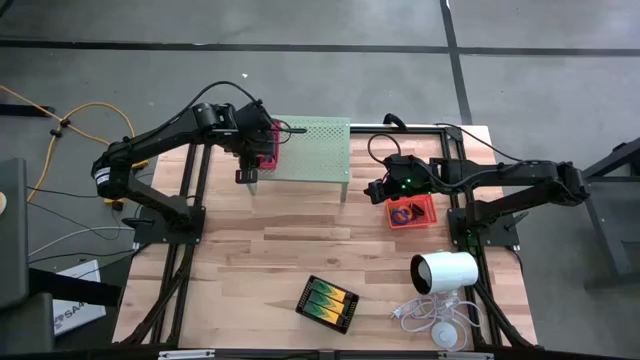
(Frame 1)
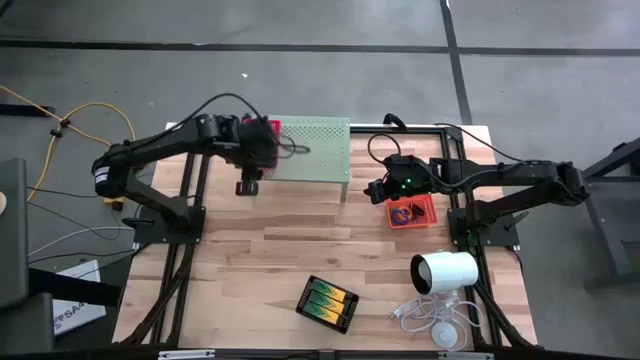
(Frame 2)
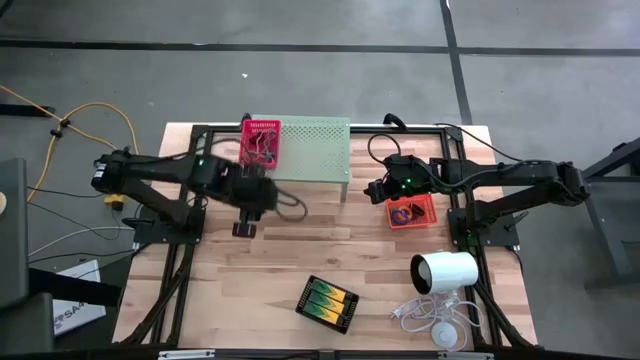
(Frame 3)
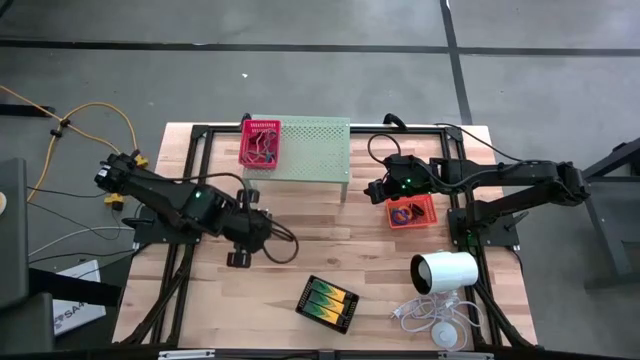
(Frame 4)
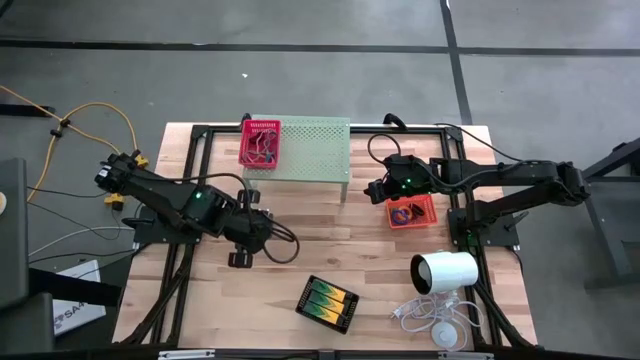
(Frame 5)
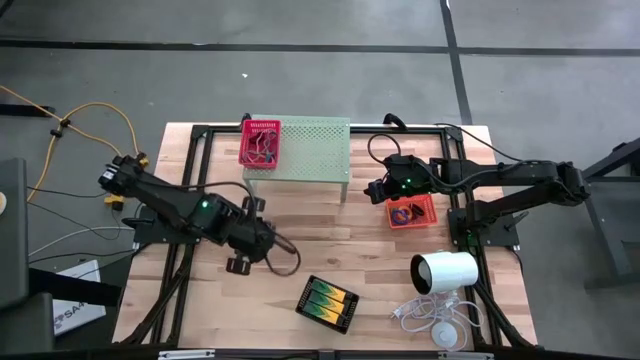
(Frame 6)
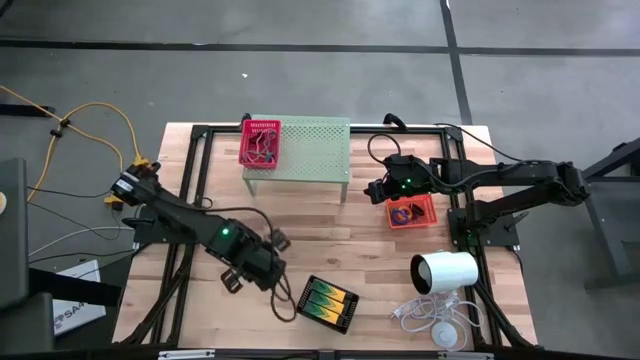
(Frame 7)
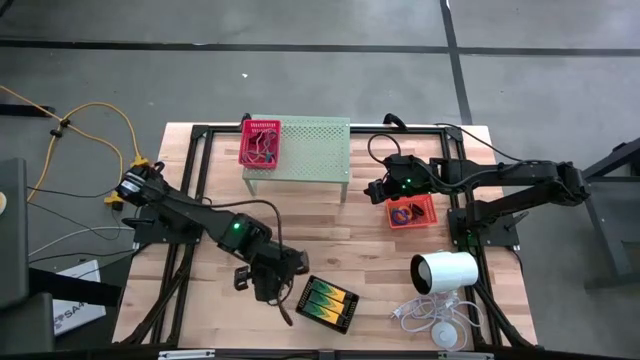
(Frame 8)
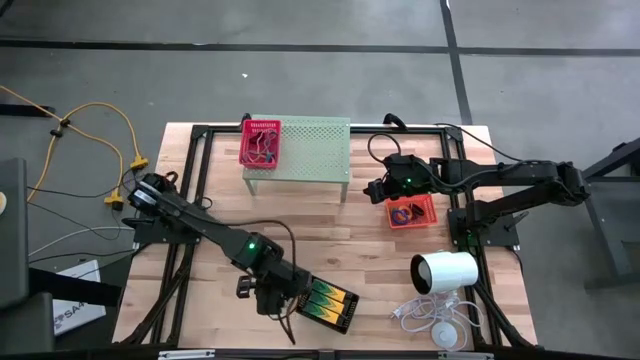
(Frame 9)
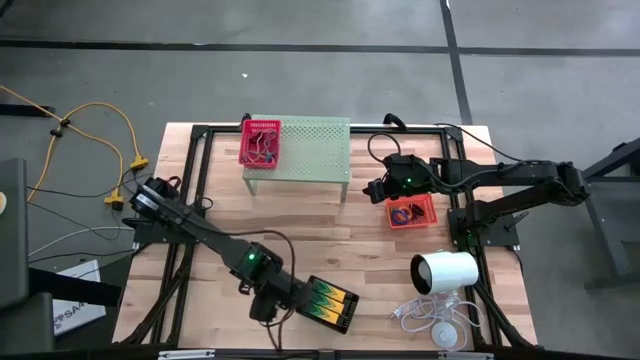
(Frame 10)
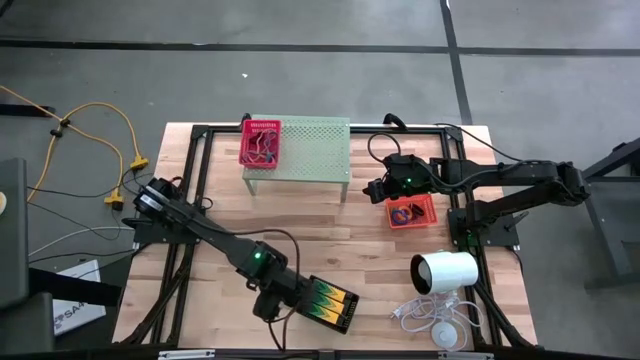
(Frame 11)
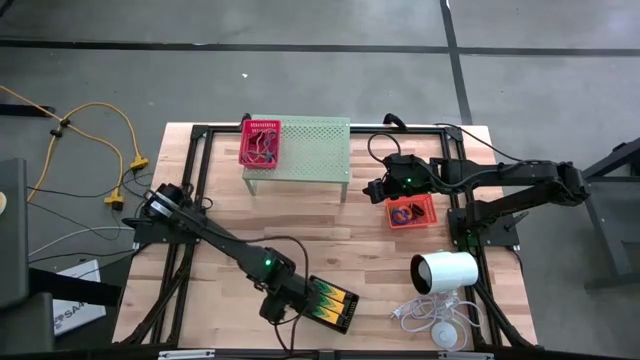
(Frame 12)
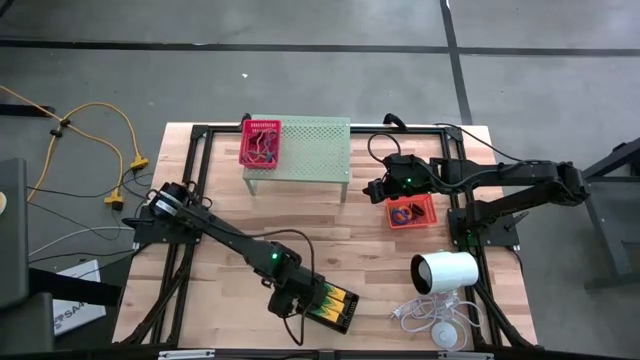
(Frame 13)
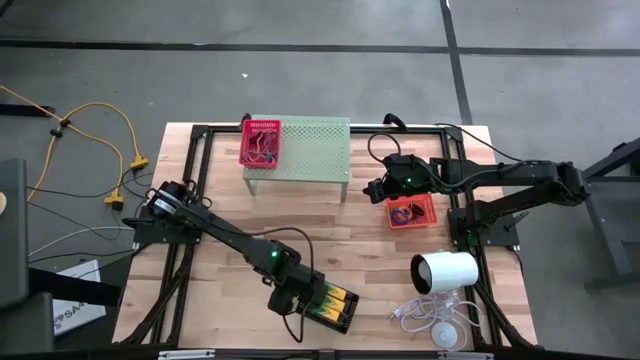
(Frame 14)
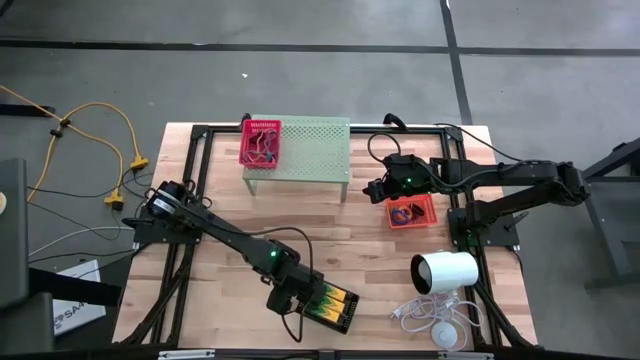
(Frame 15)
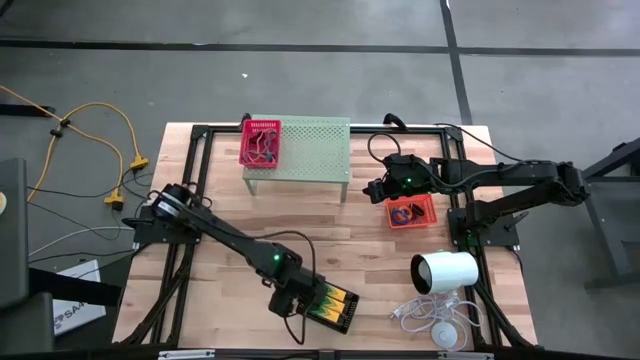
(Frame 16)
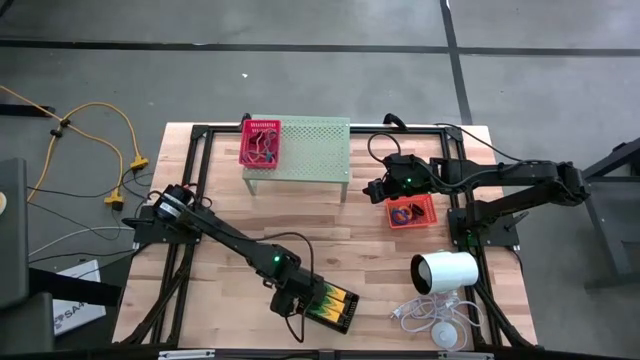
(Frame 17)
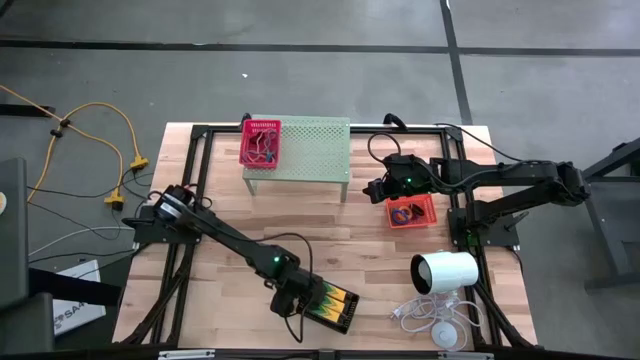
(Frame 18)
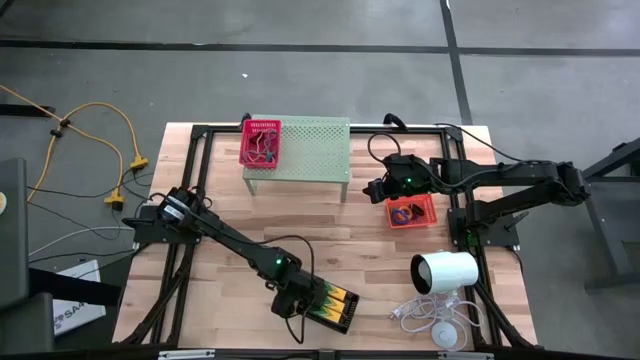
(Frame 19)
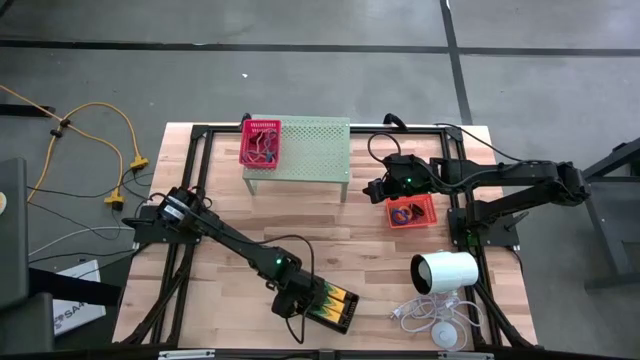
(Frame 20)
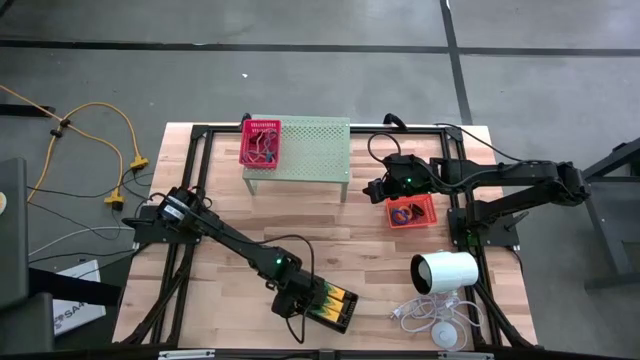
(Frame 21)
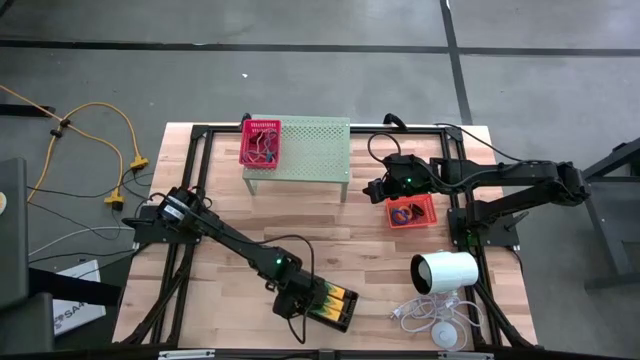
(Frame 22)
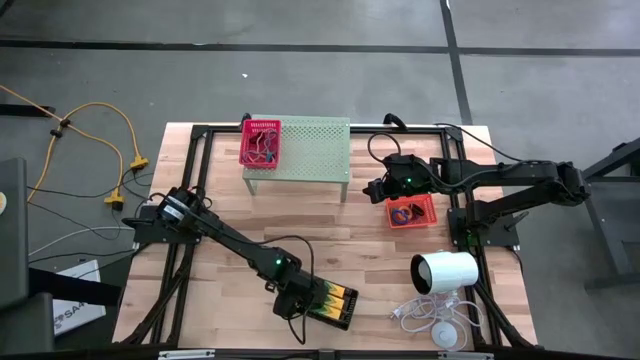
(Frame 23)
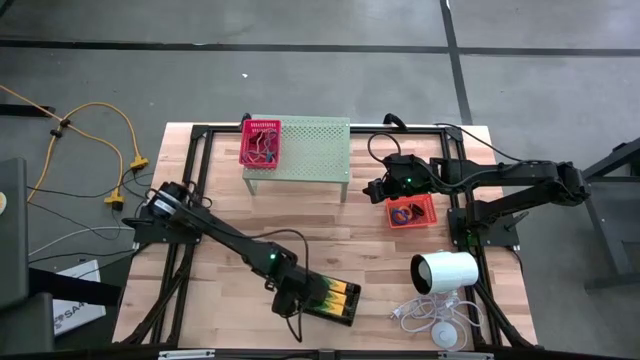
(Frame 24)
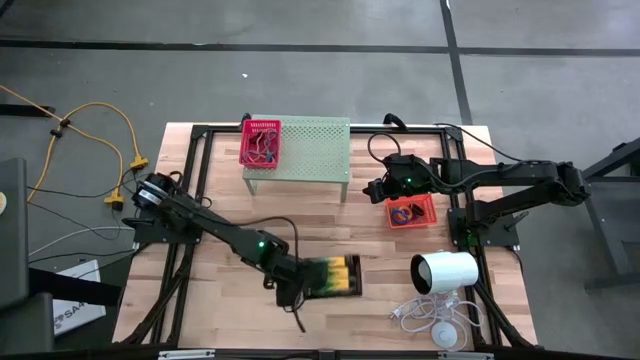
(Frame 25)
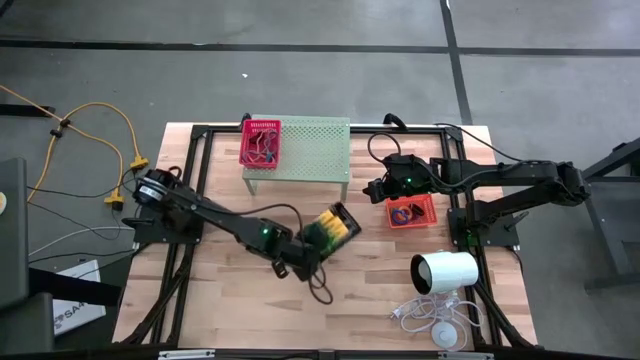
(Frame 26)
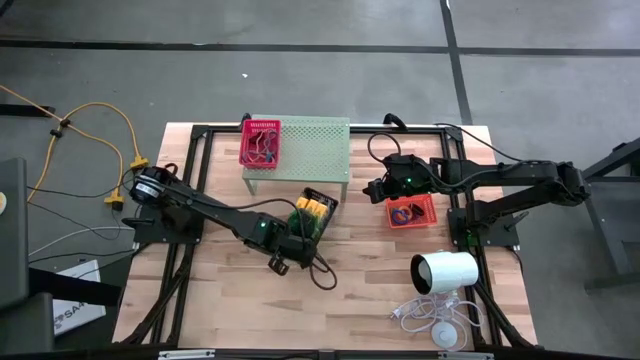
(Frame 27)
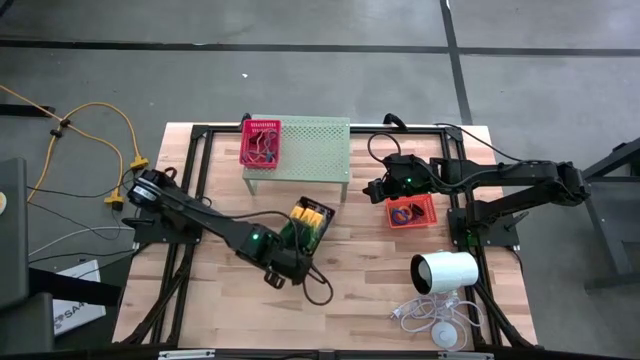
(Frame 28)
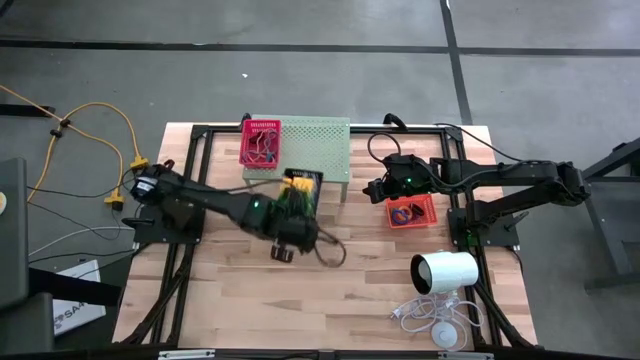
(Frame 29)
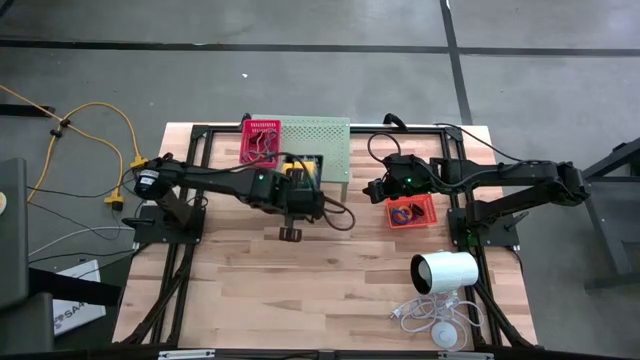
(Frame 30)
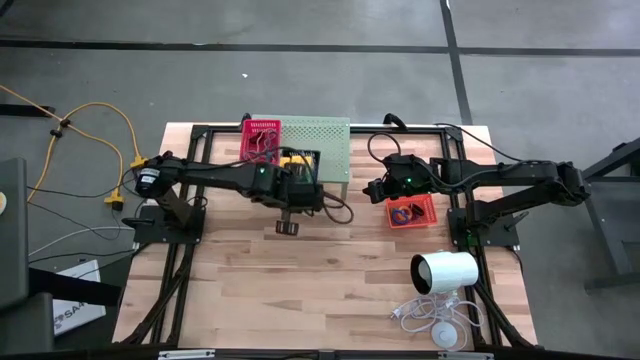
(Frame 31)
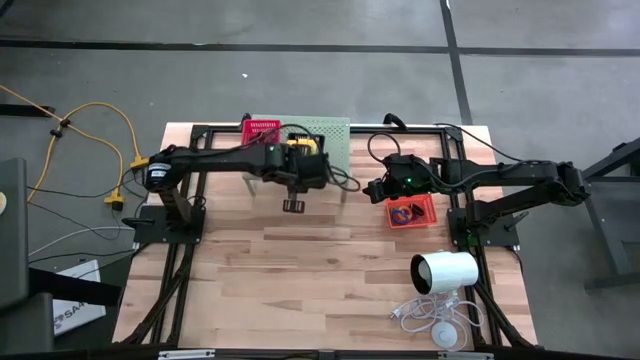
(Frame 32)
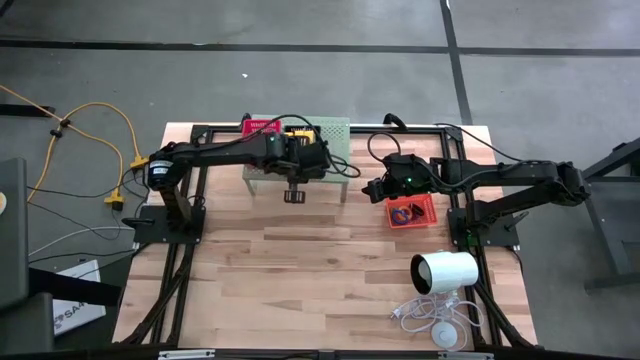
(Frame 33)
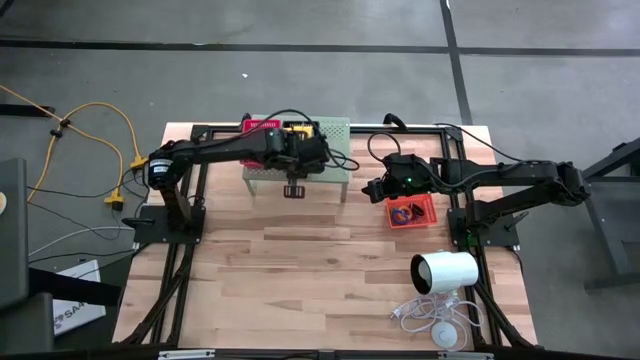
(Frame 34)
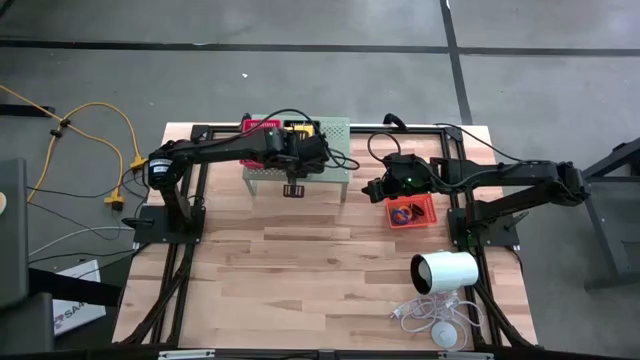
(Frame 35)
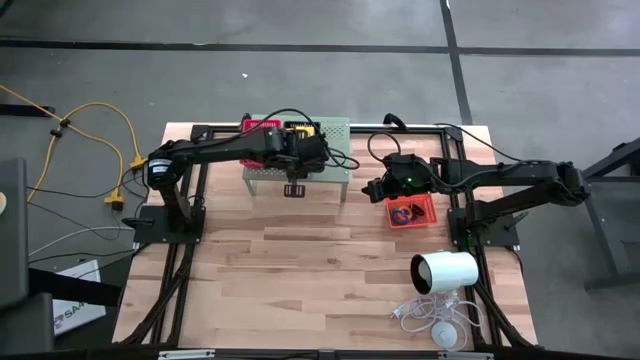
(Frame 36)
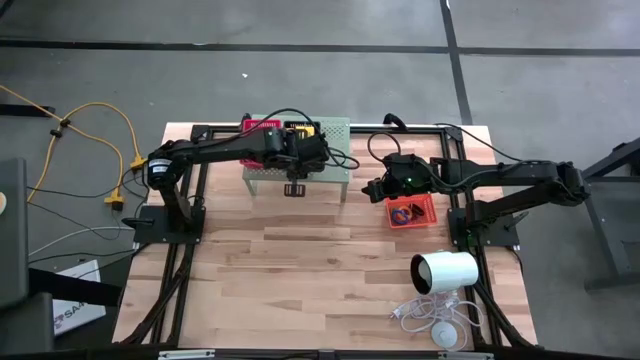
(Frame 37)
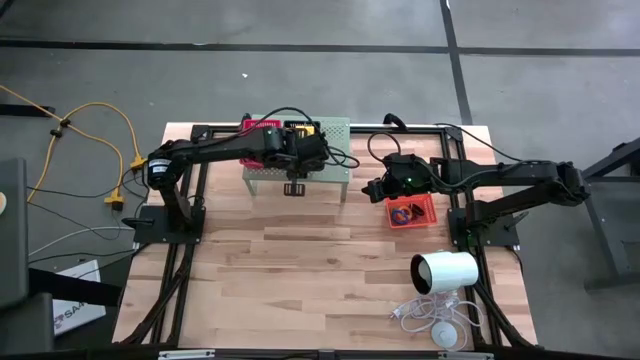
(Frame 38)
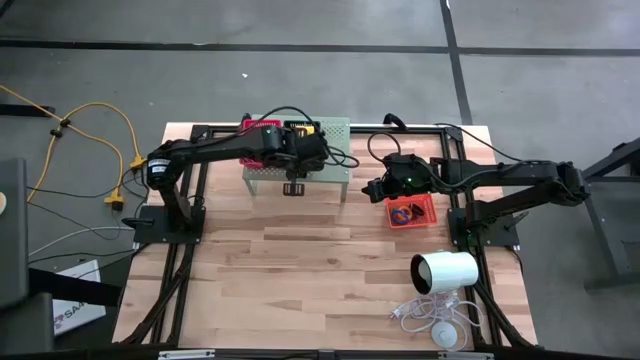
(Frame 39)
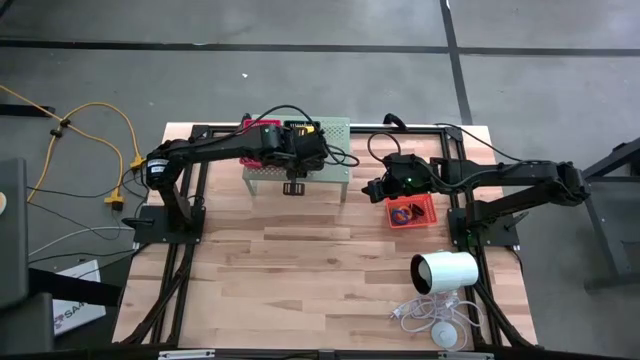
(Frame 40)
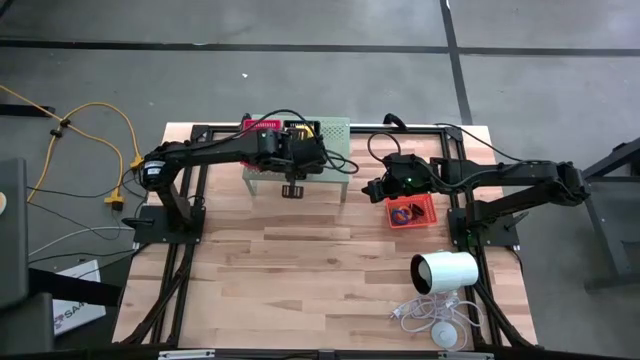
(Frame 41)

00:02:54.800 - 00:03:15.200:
Task: Pick & Place Office Desk Supplies
Put the black bin on the shelf

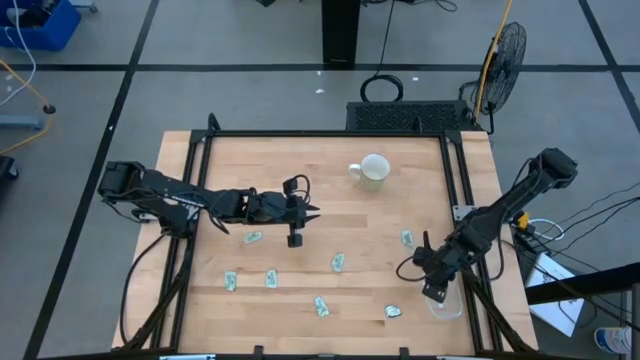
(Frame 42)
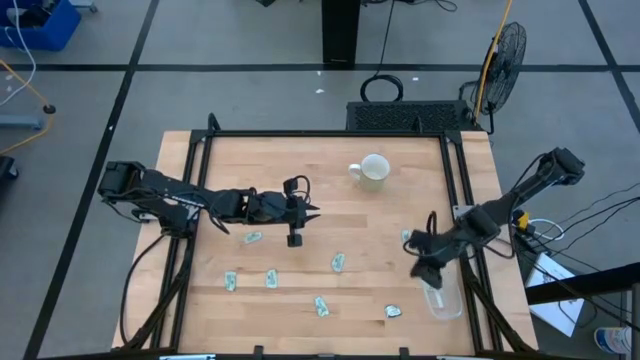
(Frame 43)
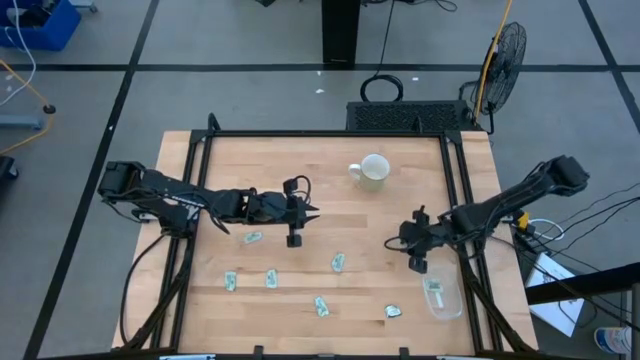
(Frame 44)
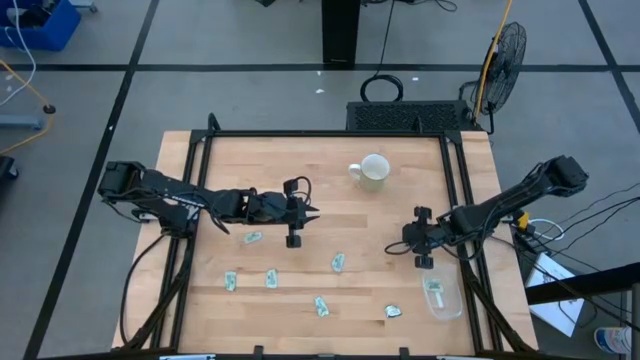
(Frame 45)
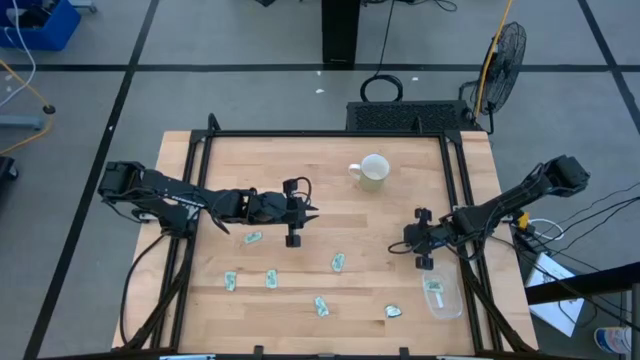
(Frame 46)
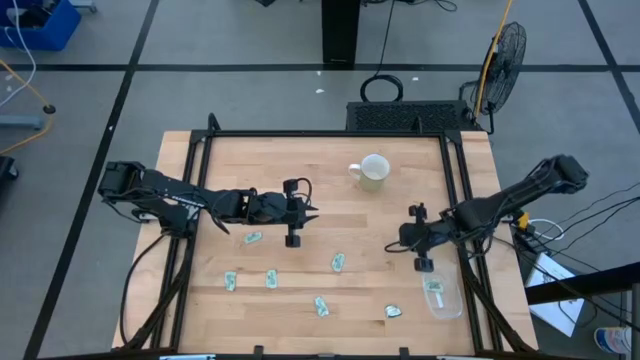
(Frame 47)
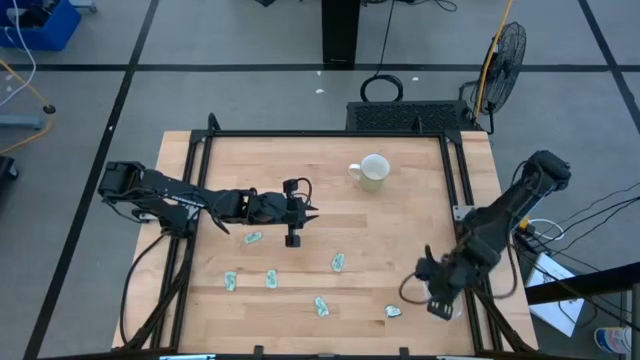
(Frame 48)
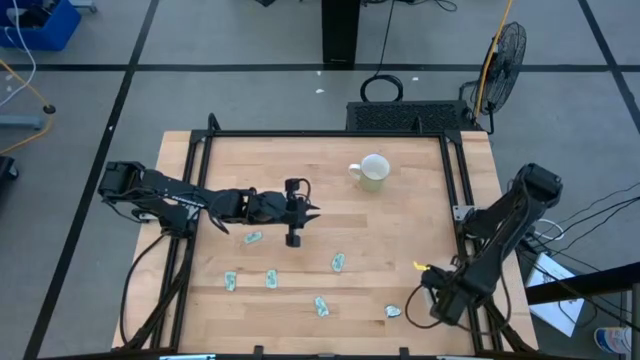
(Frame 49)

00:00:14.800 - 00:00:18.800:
Task: Pick and place Stevia / Truvia into bins
Put the stevia packet into the transparent bin
